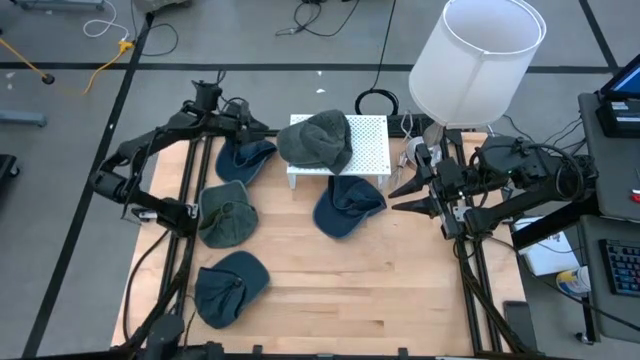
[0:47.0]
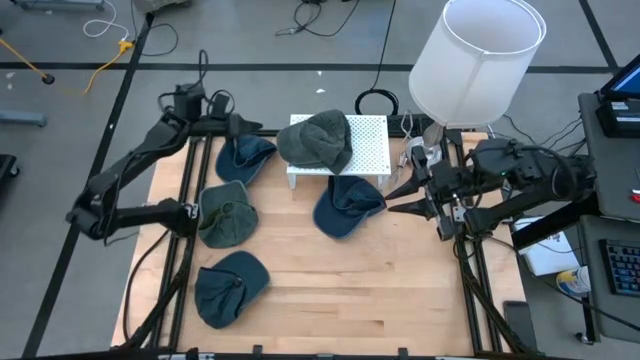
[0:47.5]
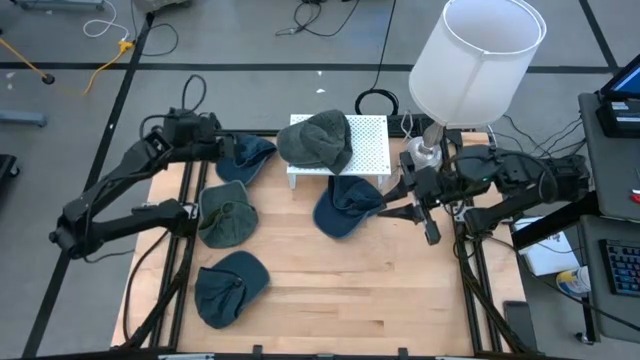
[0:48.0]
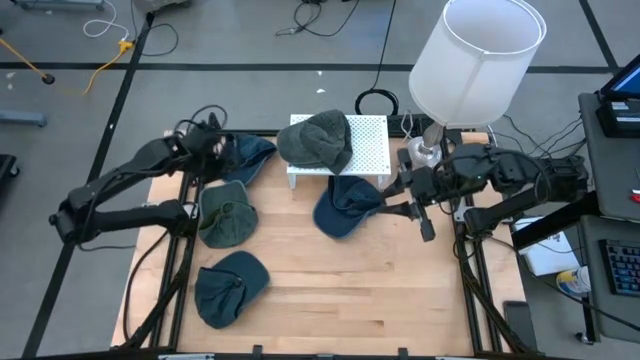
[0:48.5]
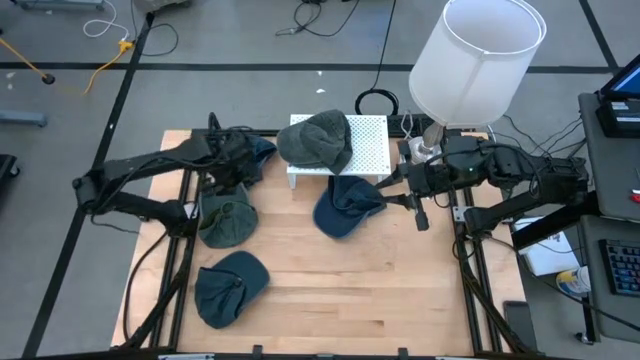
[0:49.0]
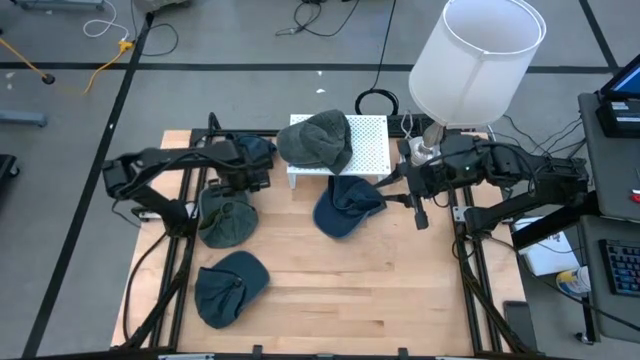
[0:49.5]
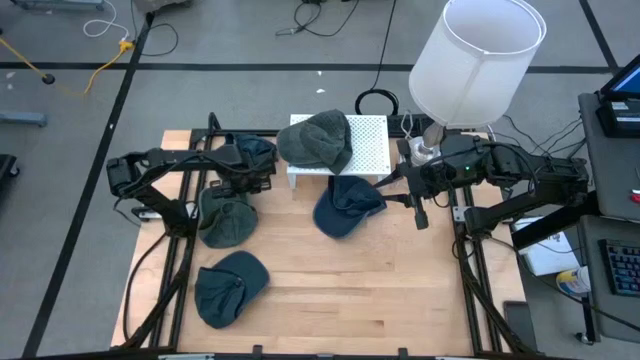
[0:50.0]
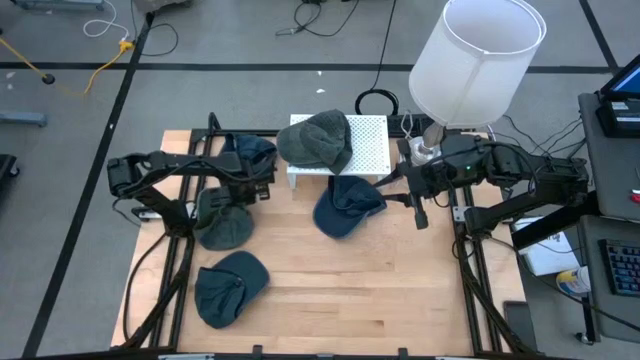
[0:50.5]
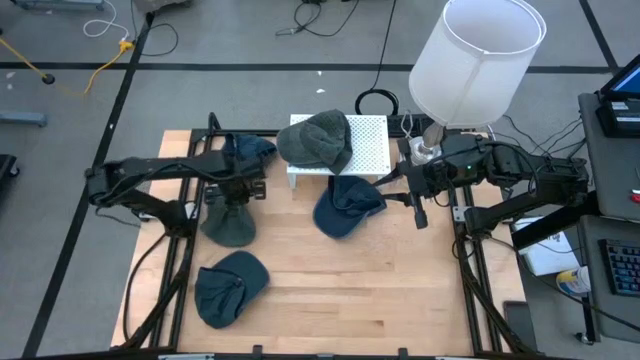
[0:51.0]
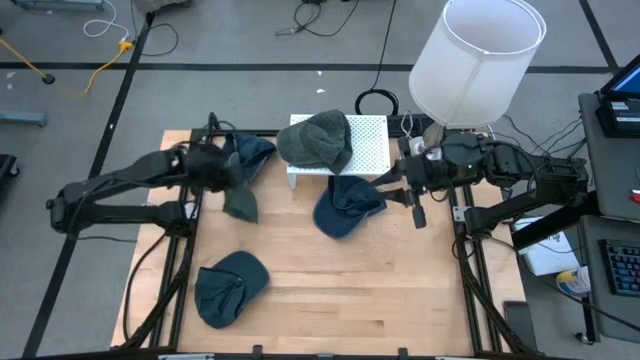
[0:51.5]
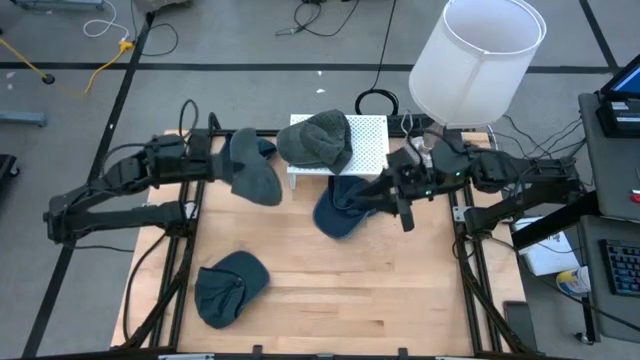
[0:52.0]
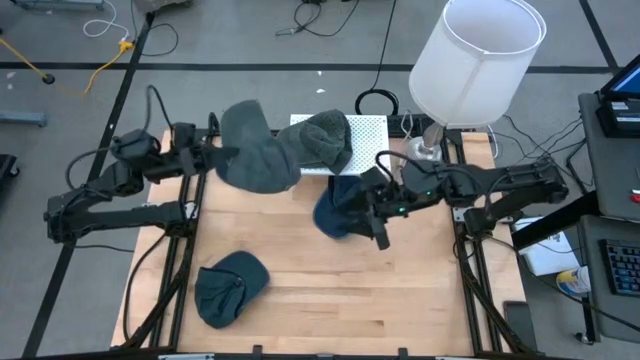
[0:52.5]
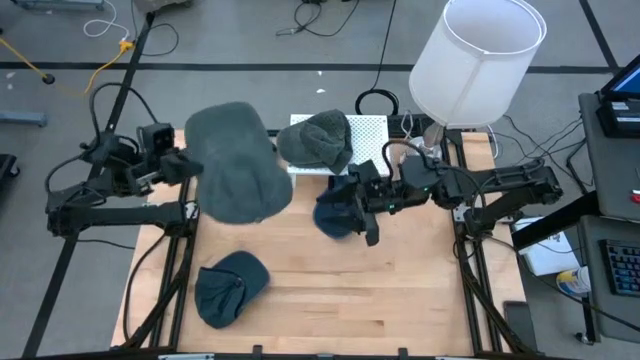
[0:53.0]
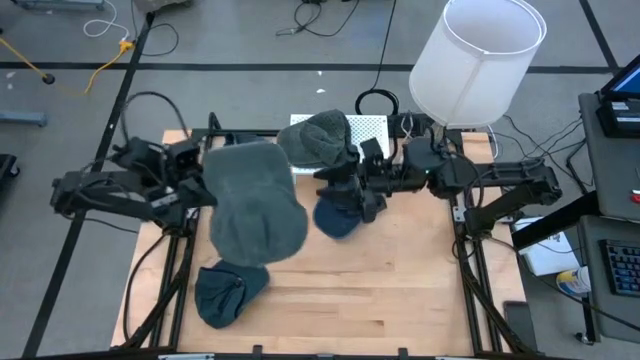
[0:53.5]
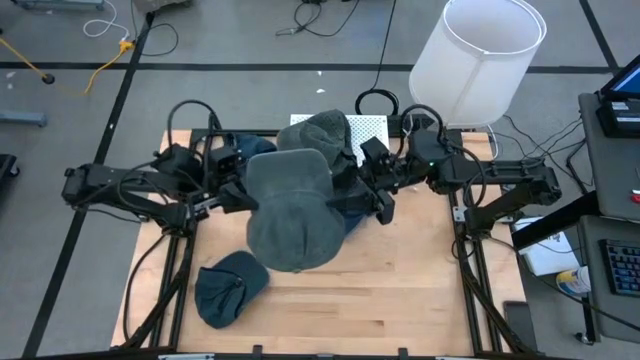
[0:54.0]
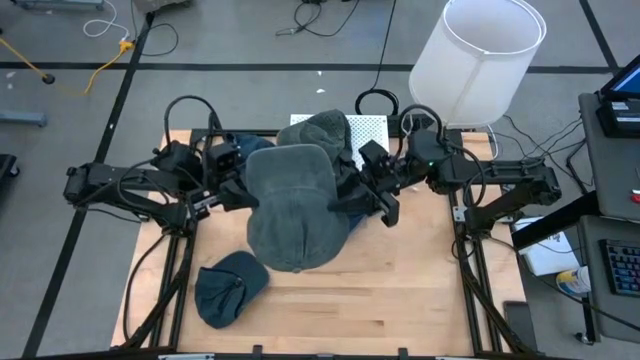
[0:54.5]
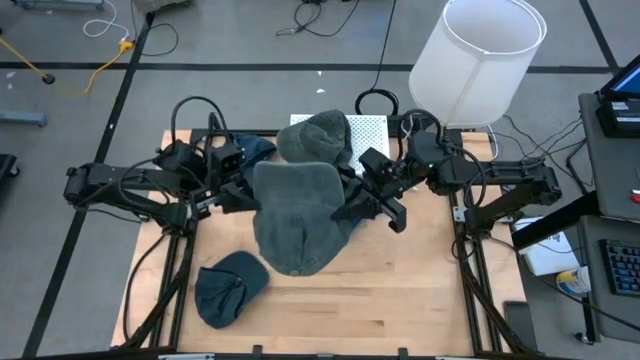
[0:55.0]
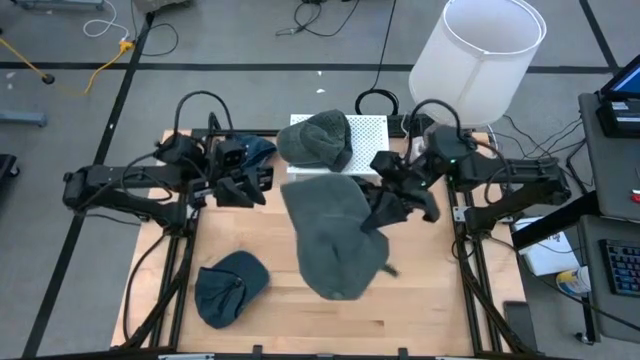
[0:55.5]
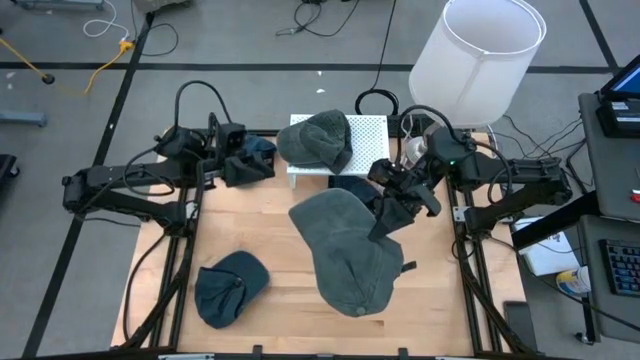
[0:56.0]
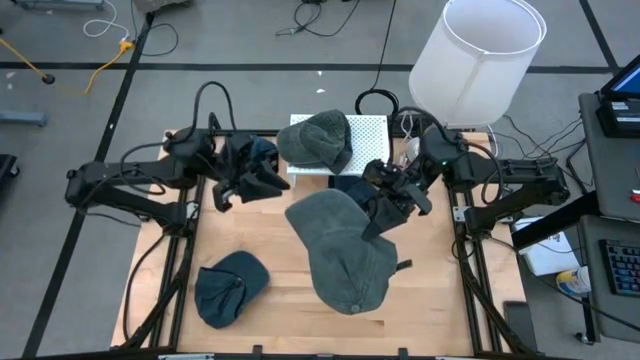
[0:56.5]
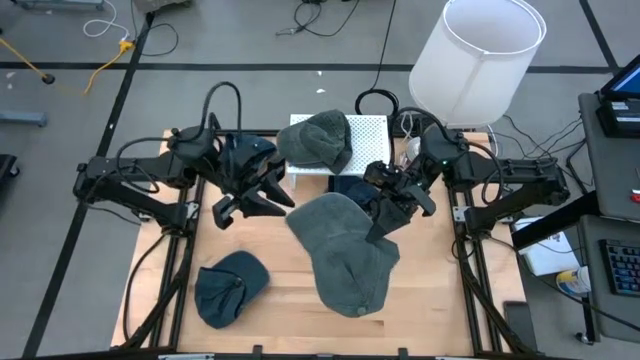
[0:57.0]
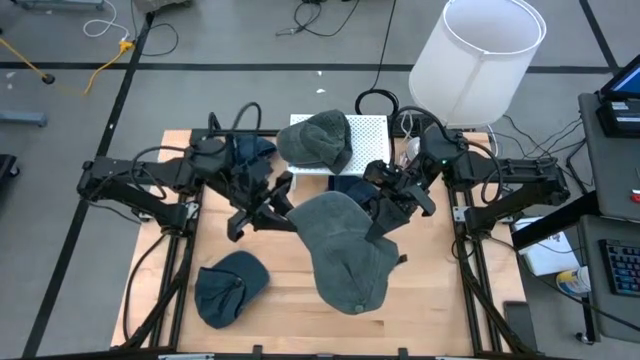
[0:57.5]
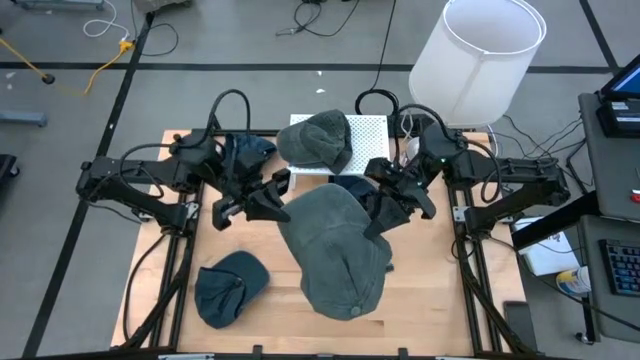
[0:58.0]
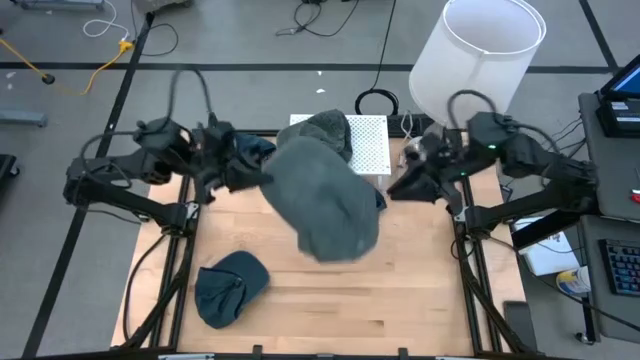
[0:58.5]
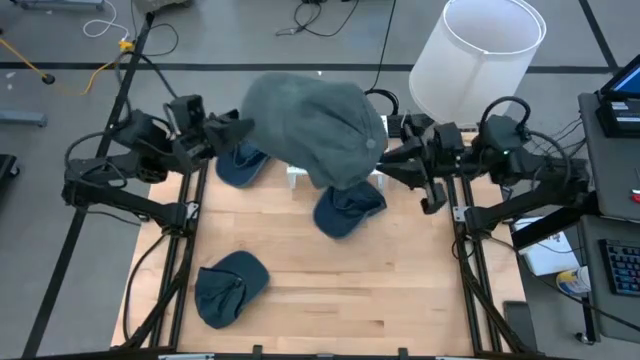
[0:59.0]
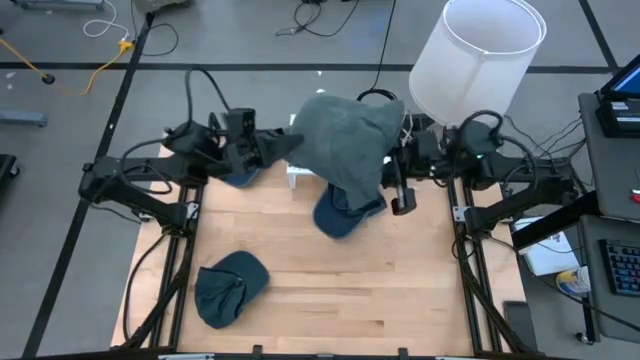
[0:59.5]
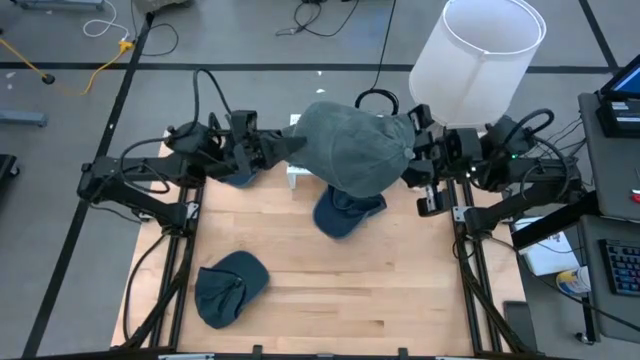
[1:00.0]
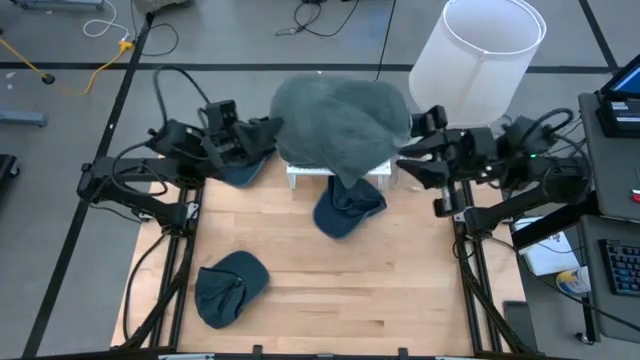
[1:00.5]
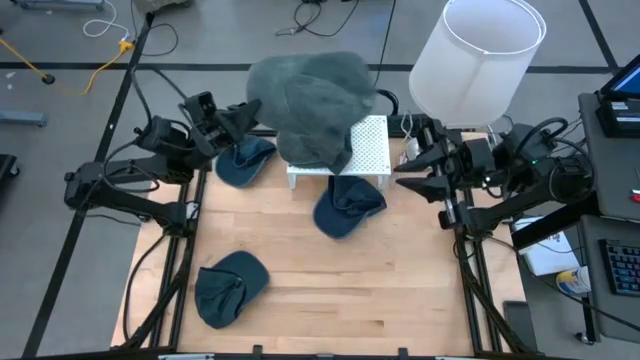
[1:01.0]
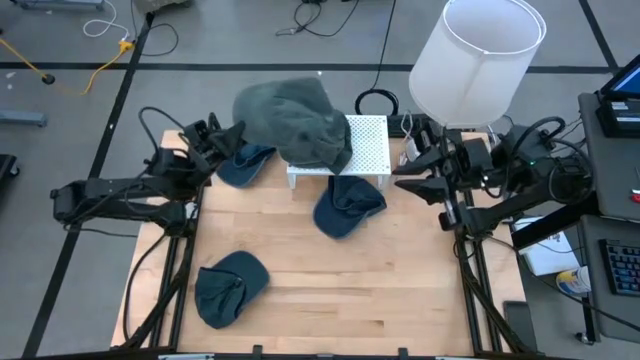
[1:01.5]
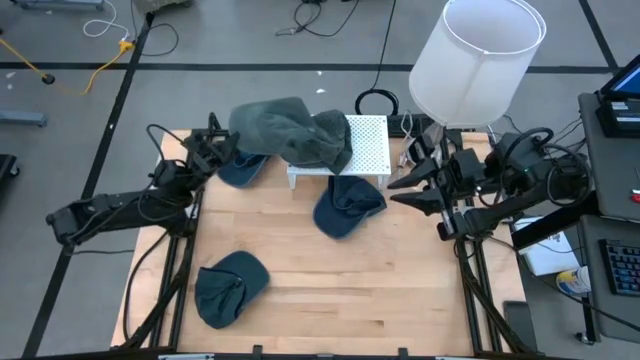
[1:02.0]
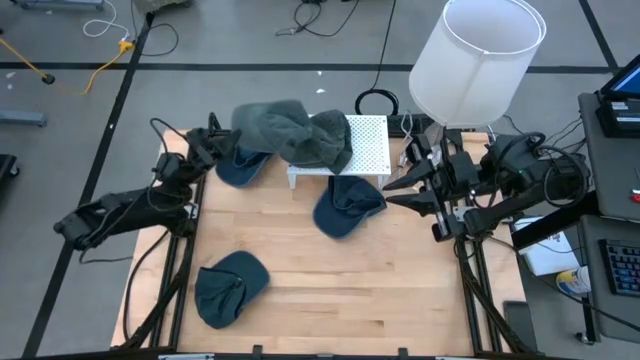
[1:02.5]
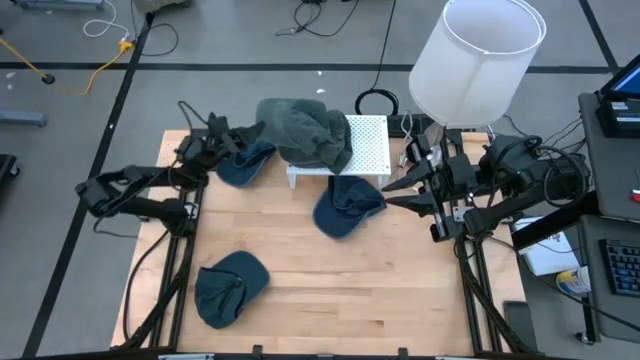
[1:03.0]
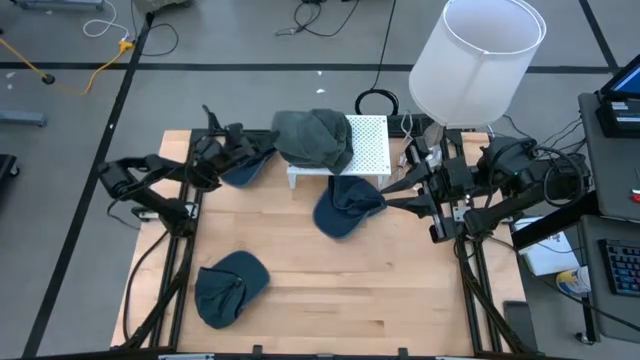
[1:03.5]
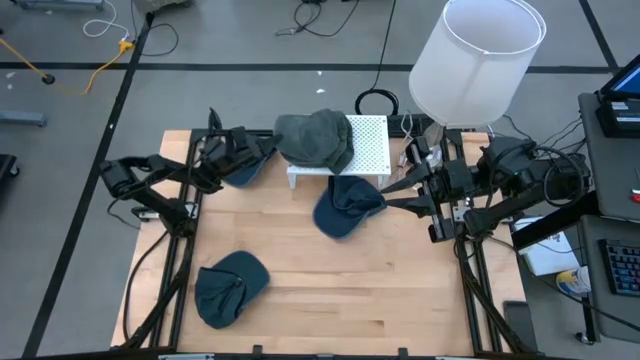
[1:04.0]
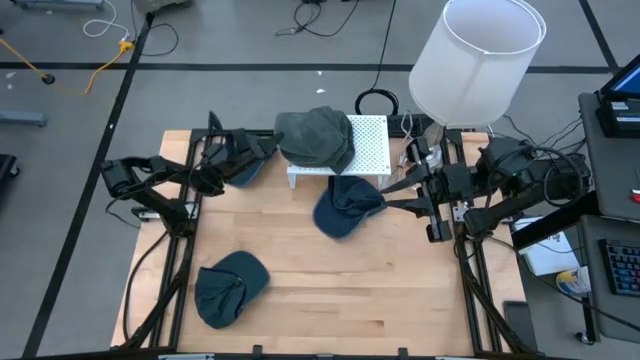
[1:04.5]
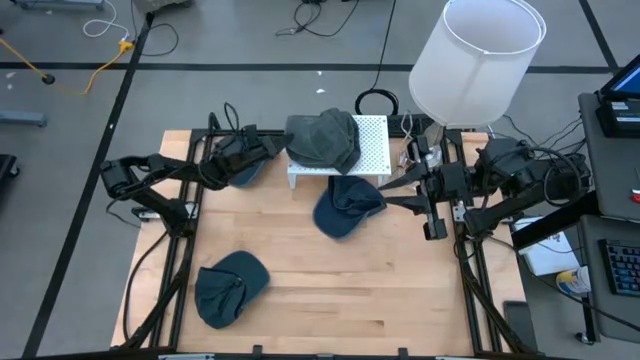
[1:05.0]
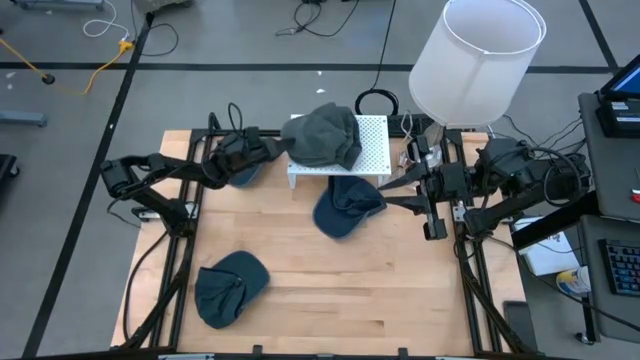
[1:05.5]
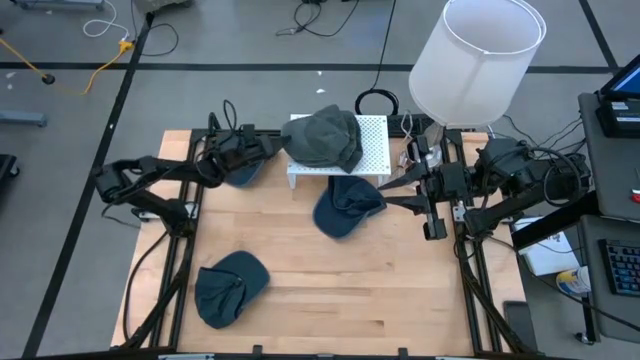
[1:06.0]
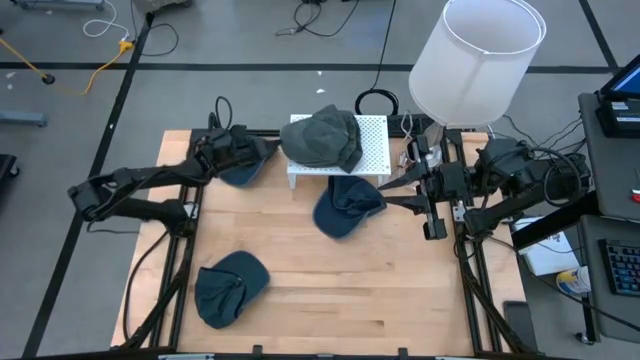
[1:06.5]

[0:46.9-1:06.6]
Task: Pick & Place hat
Stack the gray cap on top of the gray cap on the shelf

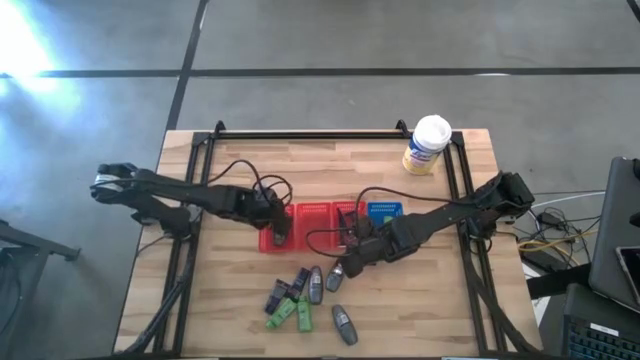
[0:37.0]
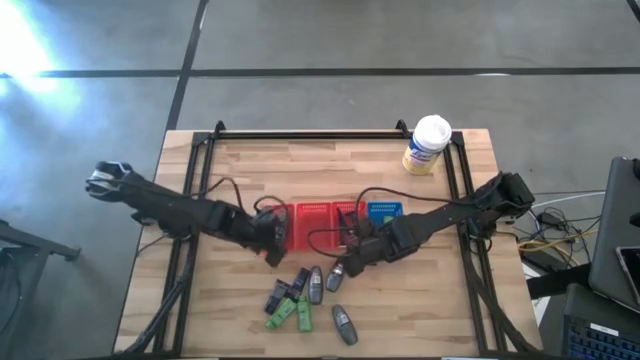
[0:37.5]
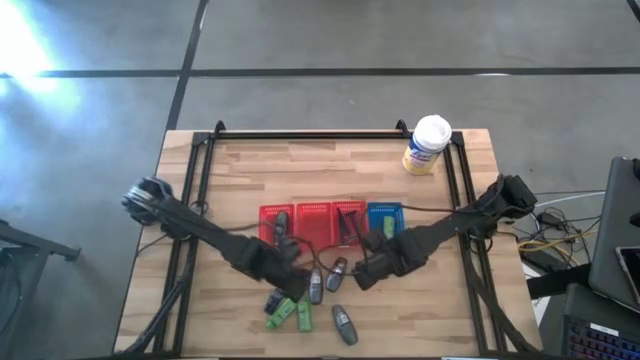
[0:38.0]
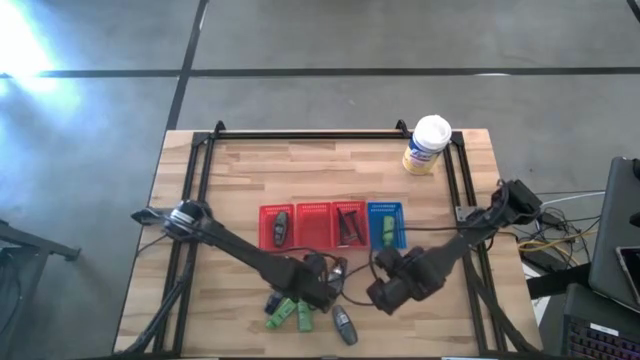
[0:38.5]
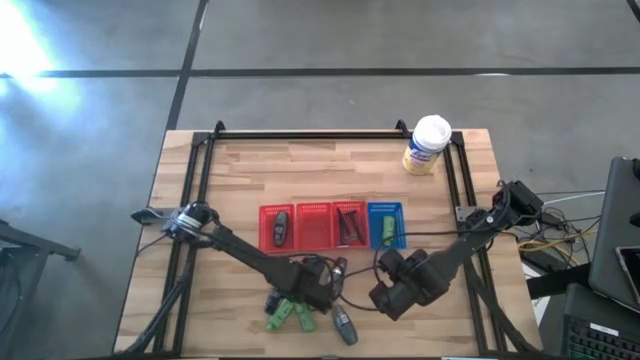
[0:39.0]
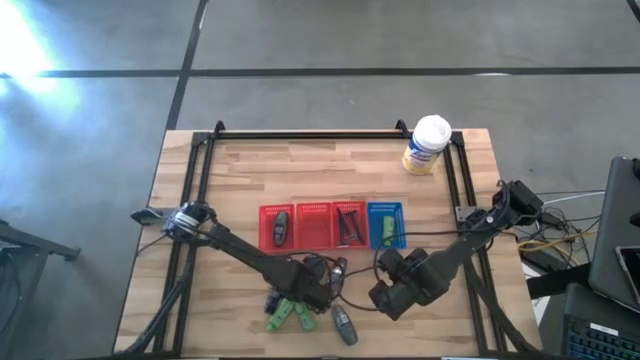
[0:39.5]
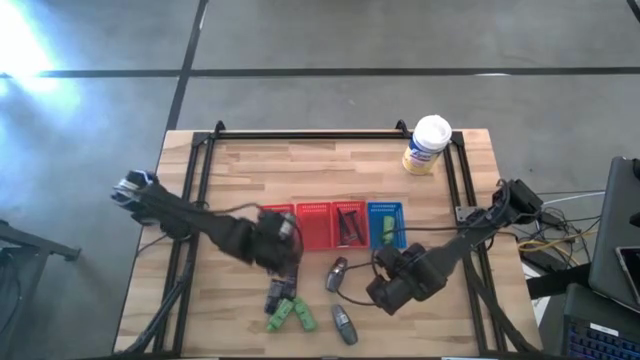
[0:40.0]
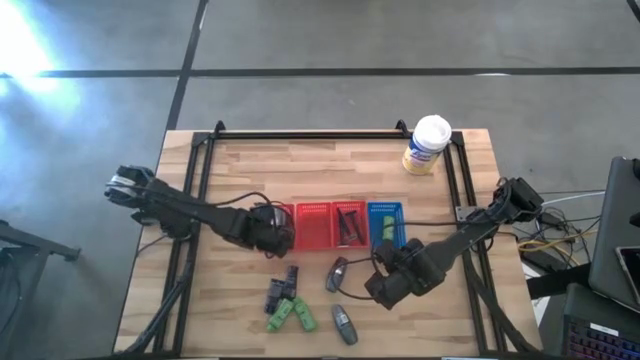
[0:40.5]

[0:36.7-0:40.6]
Task: Pick & Place Travel size toiletries
Put the gray deodorant into the left red bin
